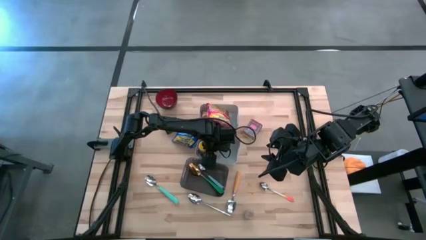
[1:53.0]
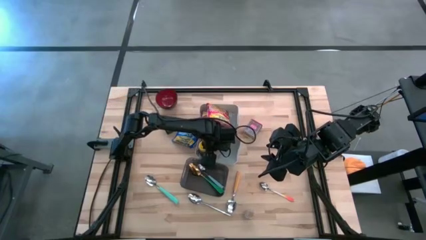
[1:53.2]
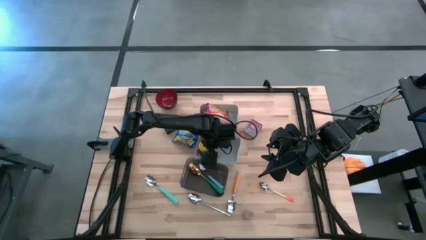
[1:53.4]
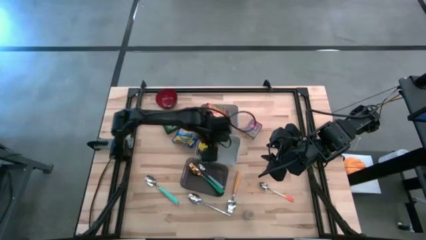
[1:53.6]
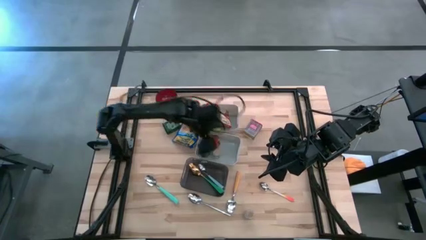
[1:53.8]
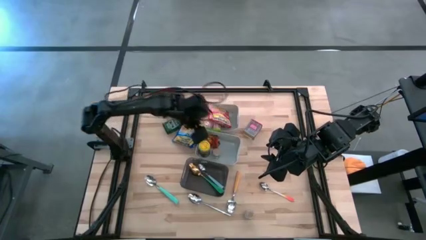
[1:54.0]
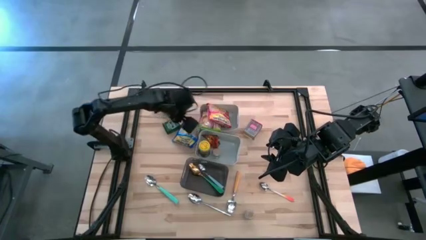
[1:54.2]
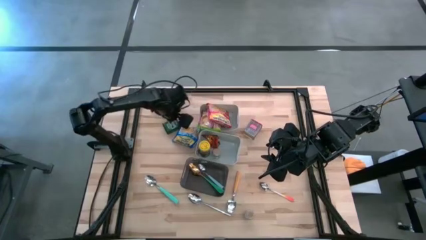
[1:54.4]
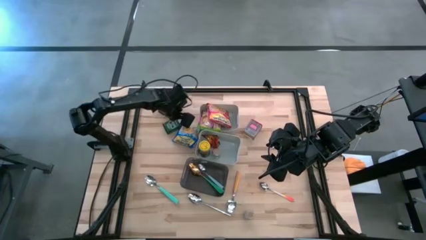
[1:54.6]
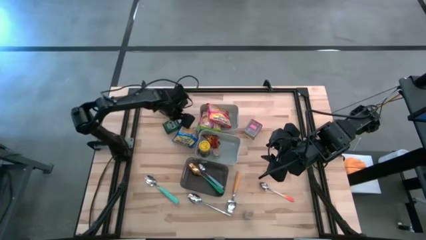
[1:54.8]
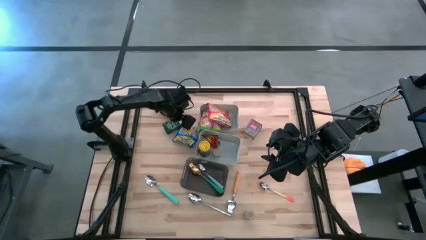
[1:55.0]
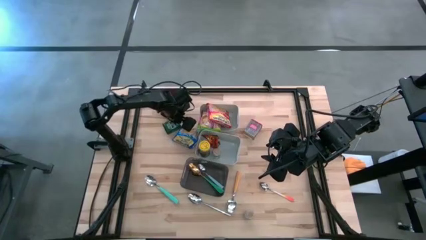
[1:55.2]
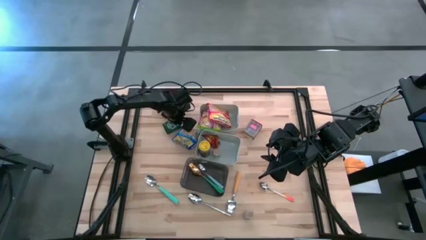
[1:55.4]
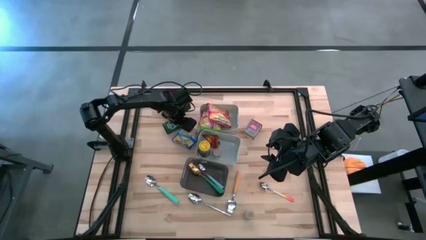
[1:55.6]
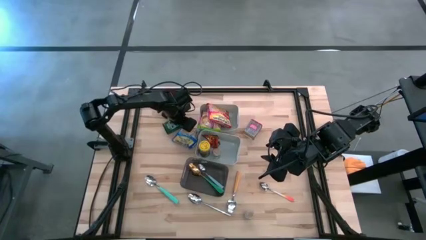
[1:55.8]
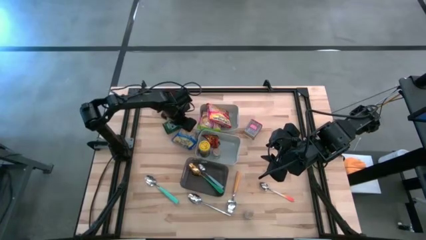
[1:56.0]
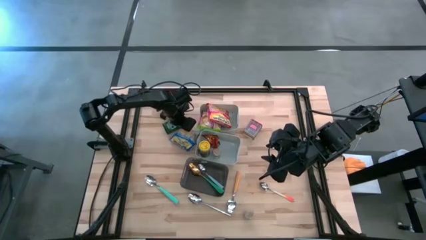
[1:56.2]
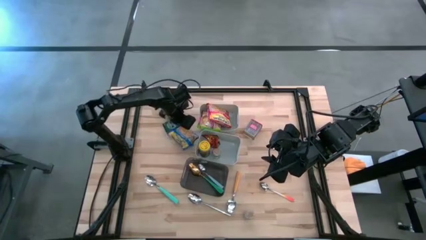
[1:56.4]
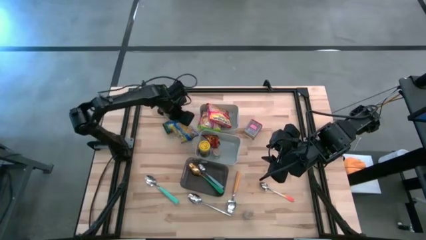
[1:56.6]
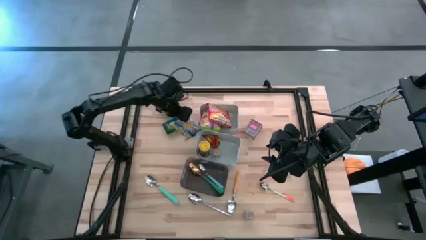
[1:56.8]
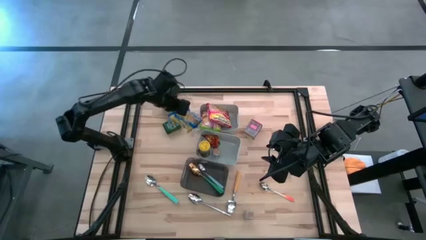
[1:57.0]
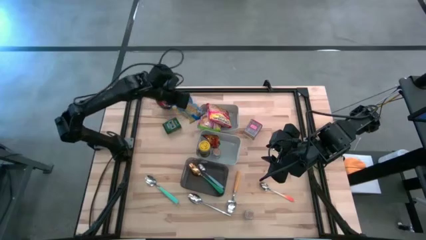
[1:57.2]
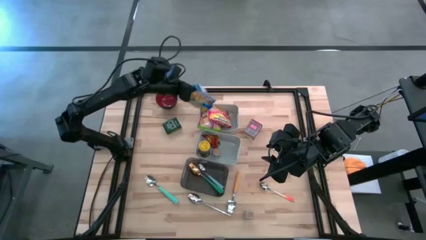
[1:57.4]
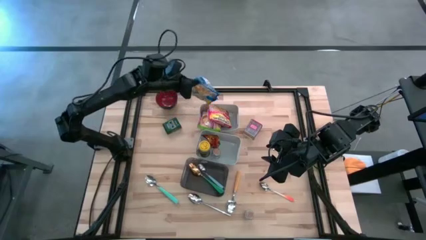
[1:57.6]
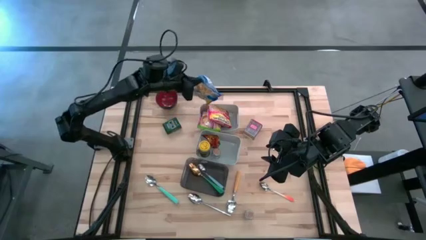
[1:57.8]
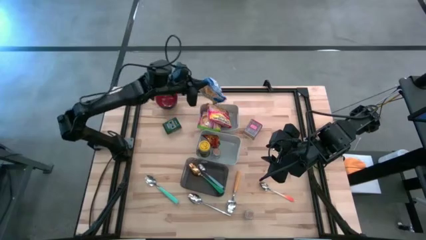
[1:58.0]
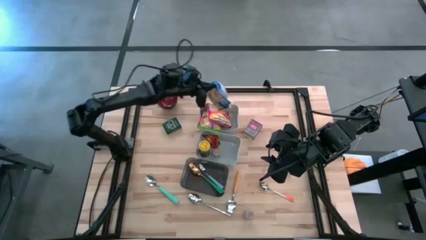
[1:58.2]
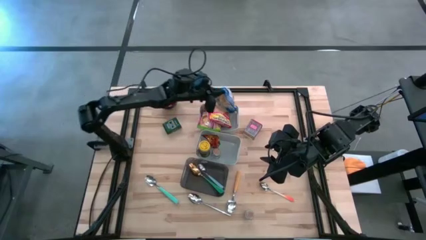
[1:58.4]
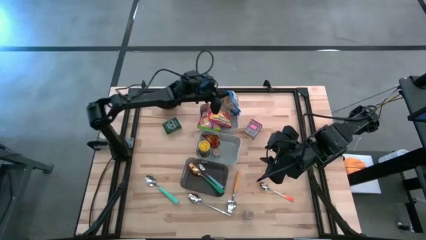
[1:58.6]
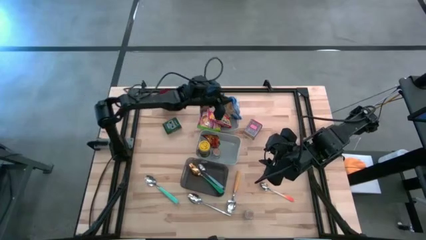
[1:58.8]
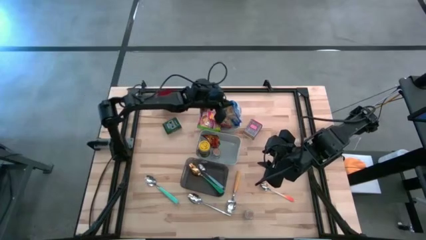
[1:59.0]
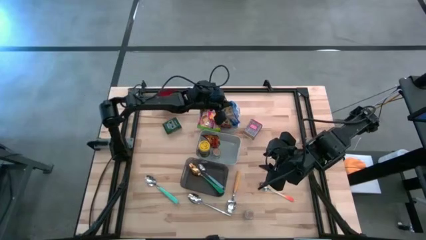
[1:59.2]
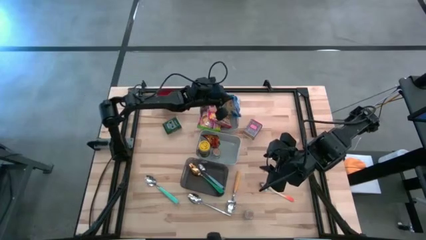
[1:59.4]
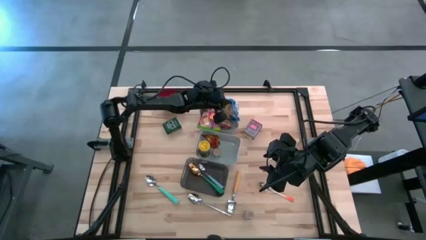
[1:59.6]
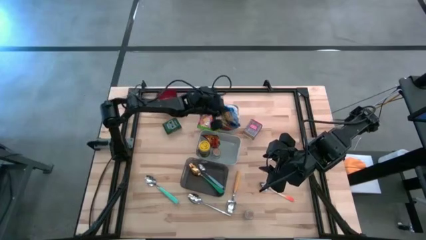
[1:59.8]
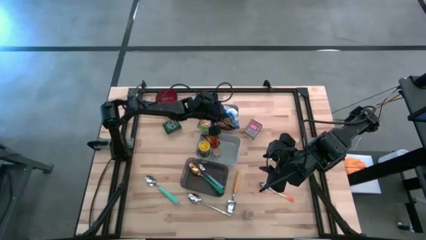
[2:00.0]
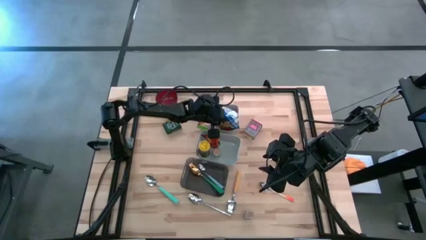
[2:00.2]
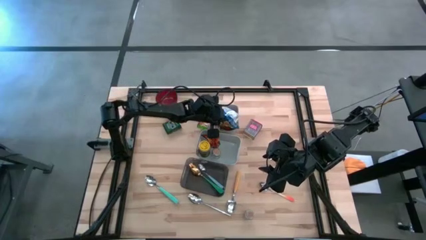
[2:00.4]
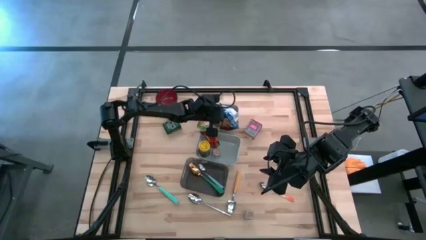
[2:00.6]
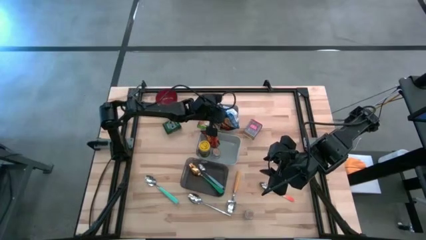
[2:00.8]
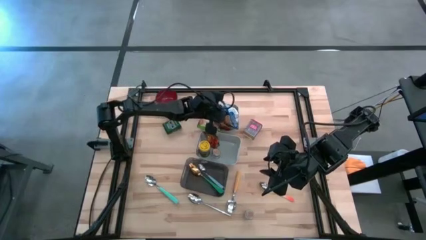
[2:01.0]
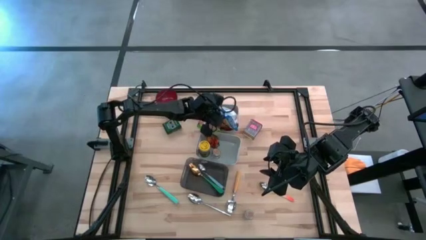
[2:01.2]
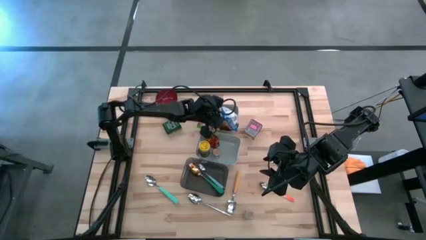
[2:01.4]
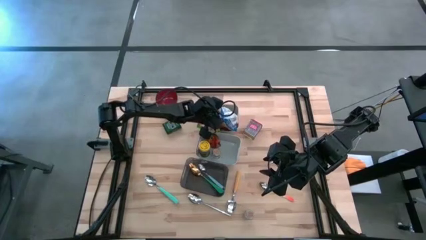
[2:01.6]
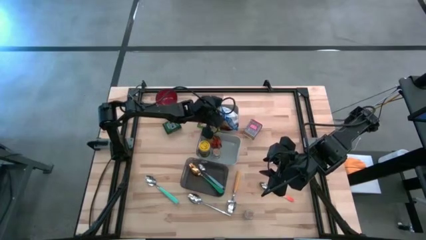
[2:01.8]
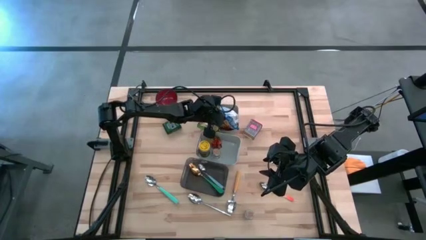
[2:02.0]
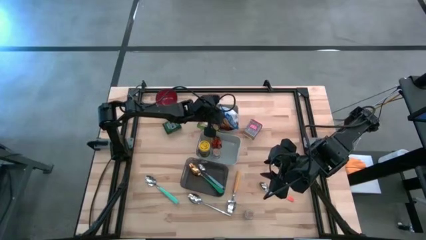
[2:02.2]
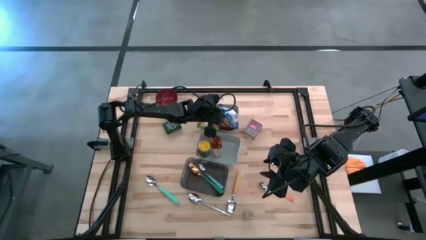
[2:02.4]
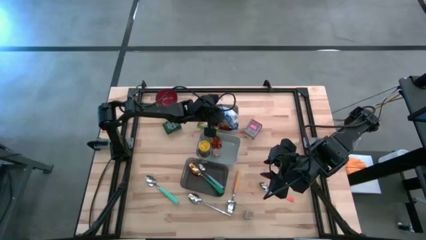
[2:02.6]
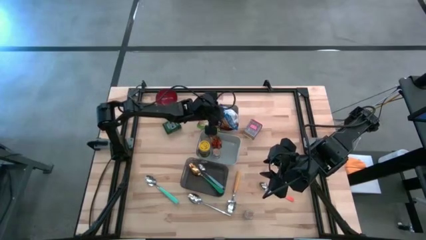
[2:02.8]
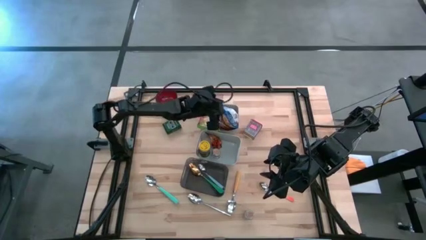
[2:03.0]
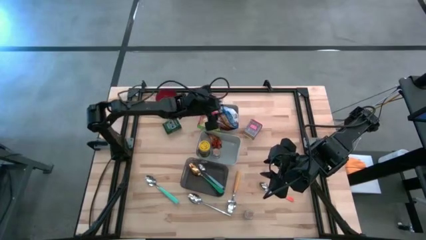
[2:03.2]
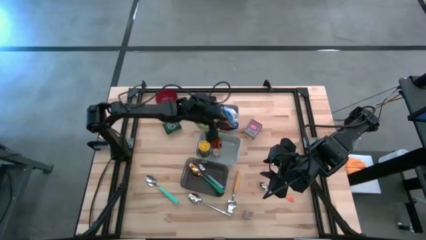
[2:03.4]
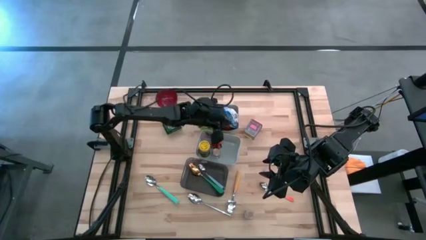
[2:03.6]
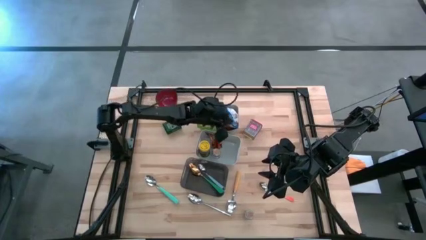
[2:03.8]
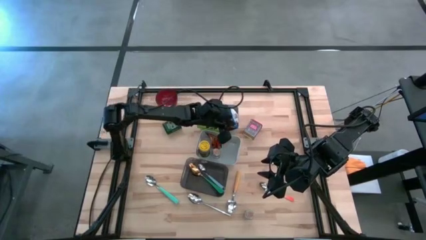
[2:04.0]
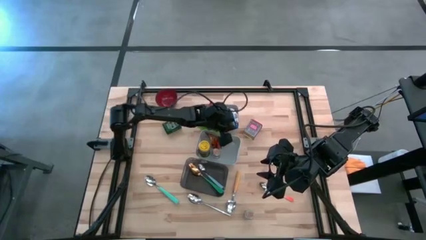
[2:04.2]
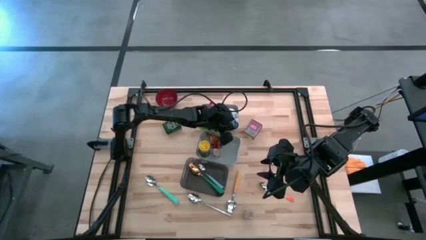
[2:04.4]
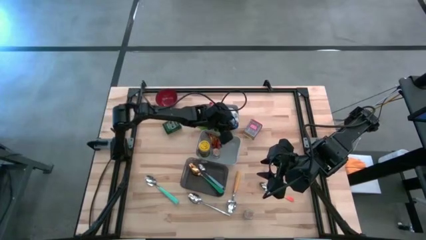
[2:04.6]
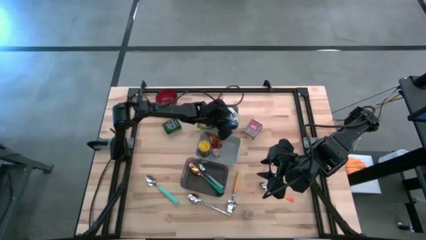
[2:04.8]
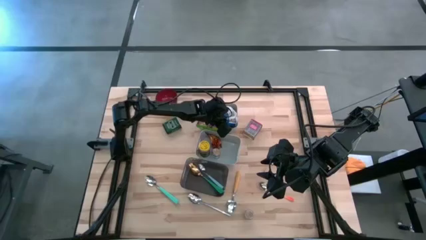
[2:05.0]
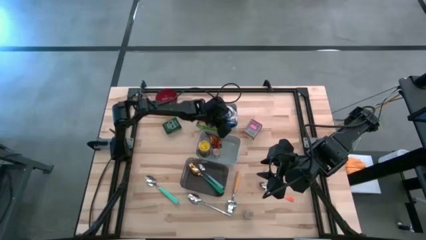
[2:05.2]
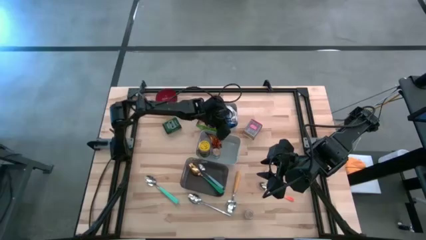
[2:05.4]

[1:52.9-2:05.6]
Put the blue noodle pack into the top gray bin
